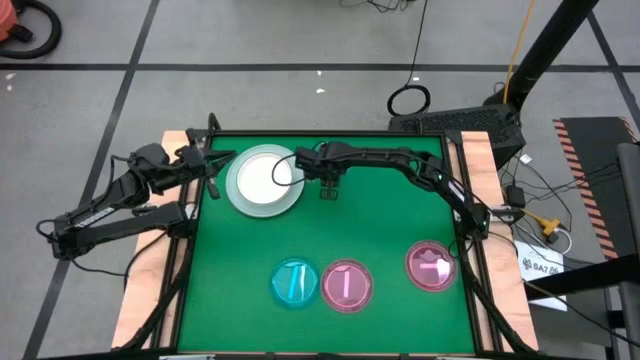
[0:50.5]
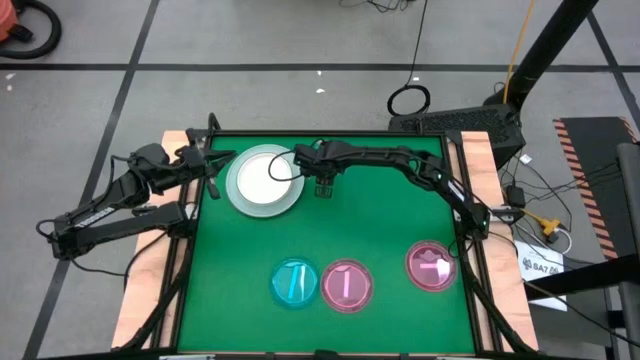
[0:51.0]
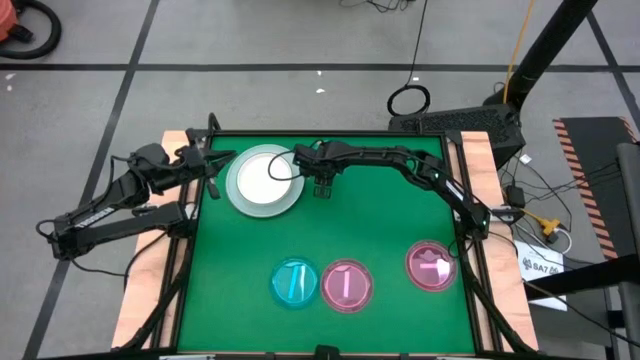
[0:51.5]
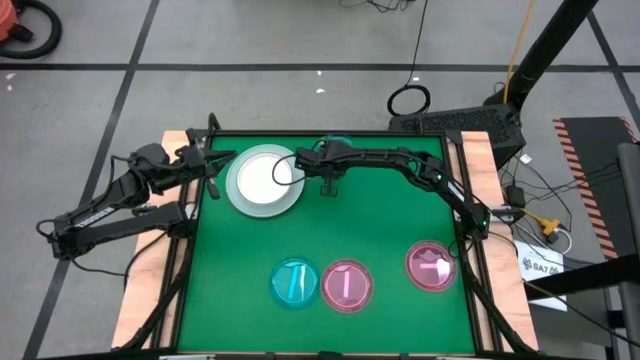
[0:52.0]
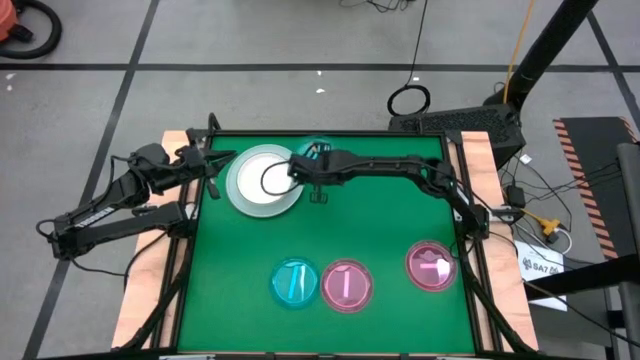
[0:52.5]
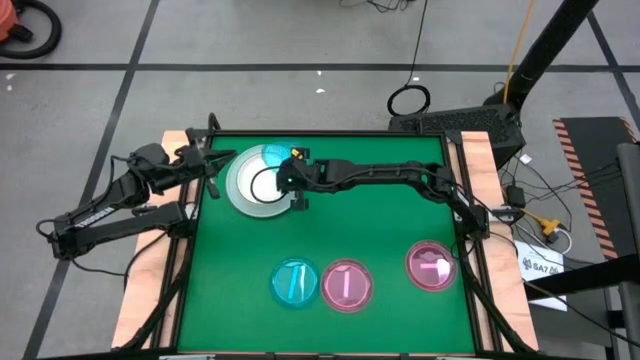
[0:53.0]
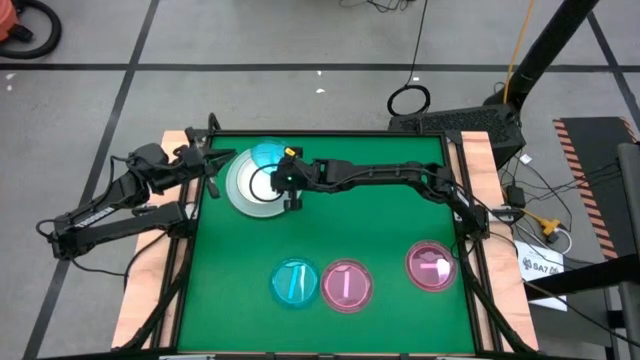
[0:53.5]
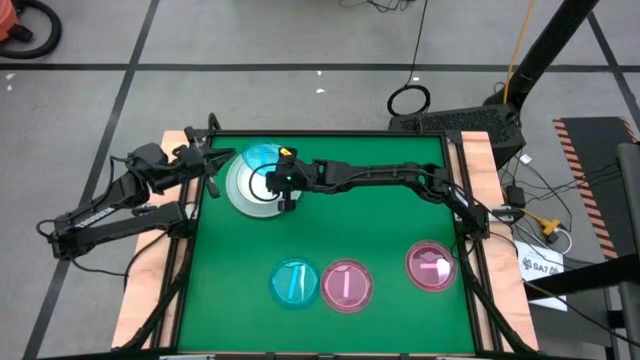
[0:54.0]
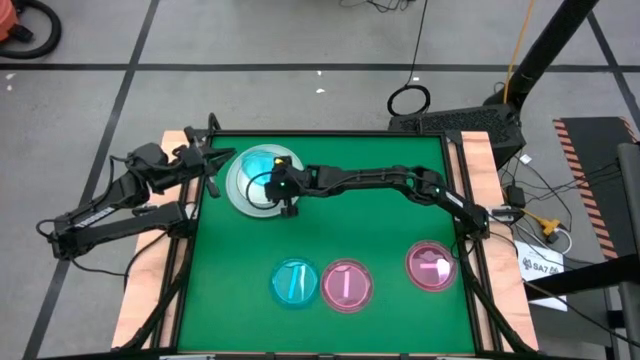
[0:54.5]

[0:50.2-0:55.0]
Task: Stack plastic plates
Stack the top blue plate on top of the white plate

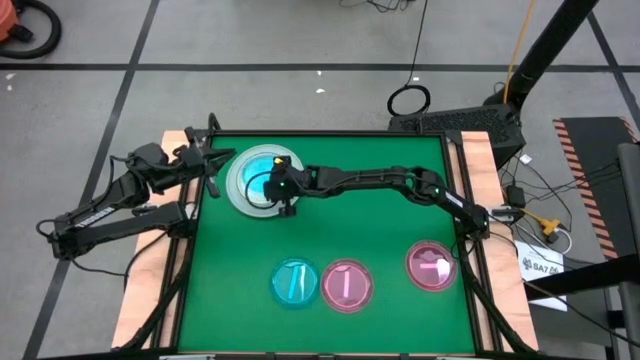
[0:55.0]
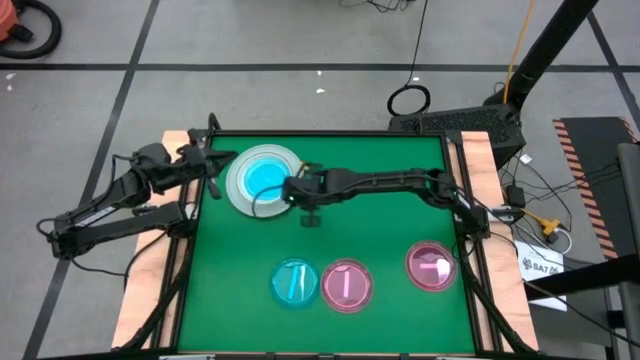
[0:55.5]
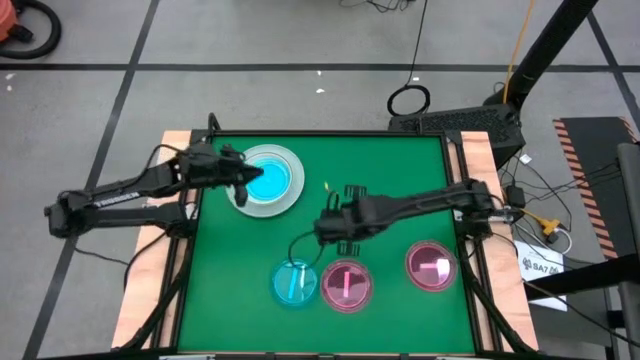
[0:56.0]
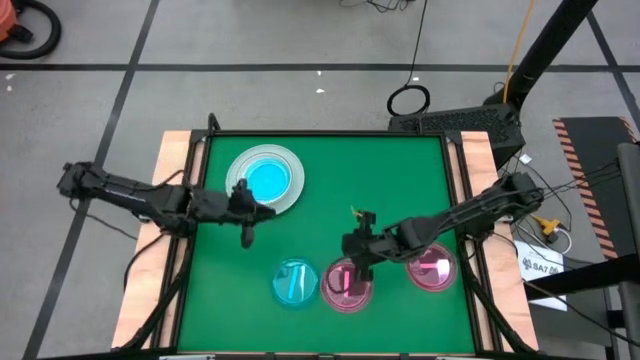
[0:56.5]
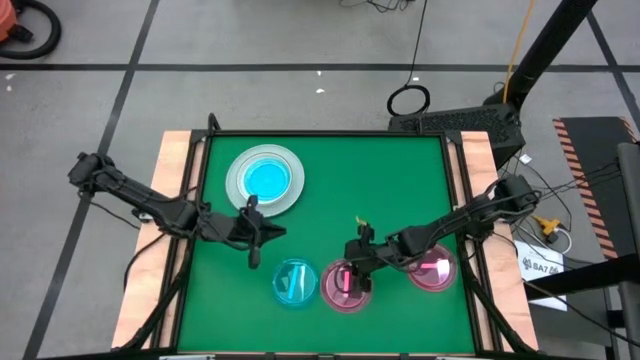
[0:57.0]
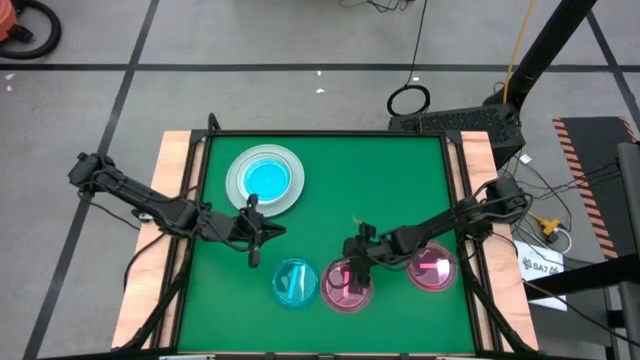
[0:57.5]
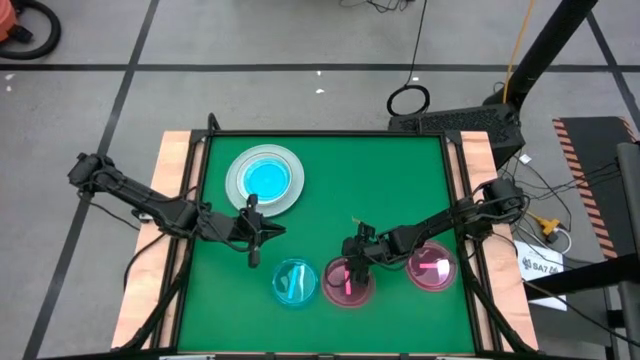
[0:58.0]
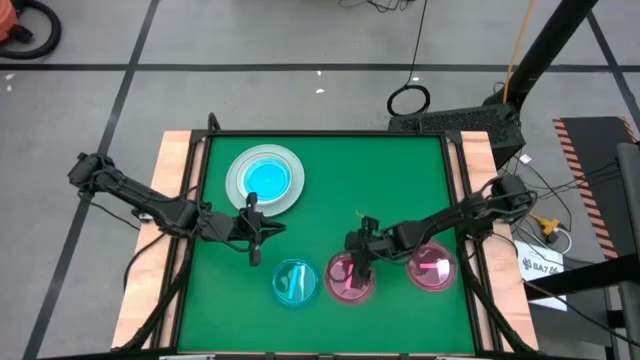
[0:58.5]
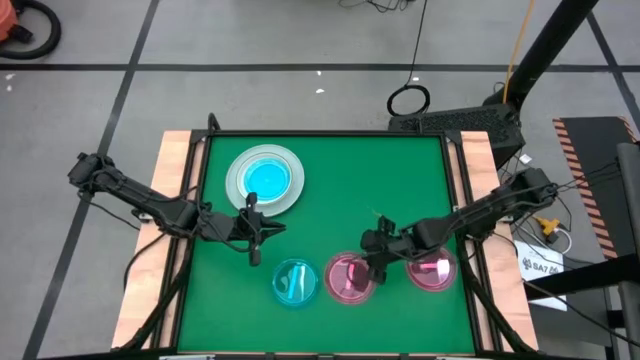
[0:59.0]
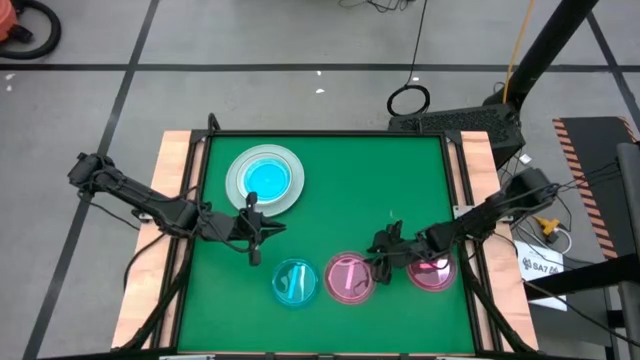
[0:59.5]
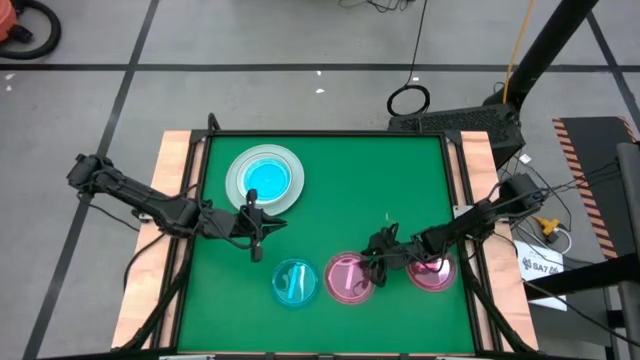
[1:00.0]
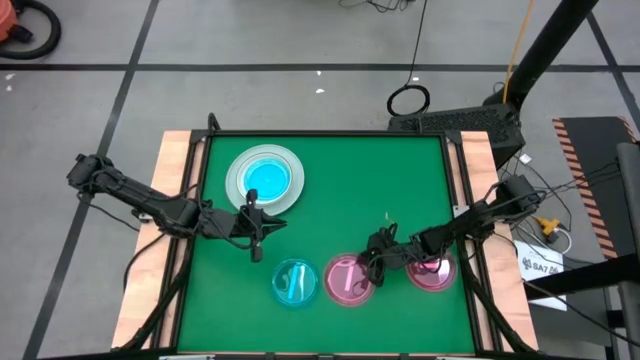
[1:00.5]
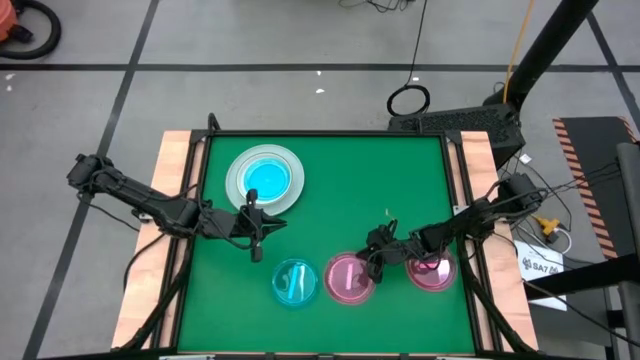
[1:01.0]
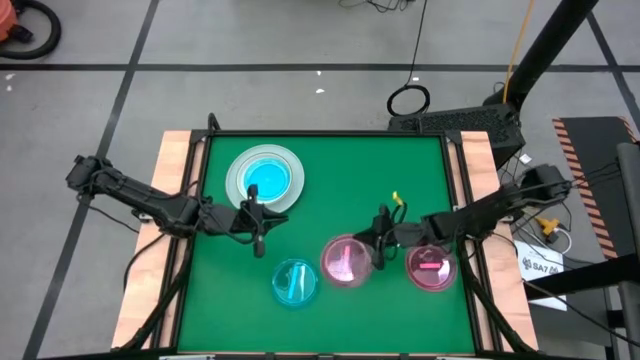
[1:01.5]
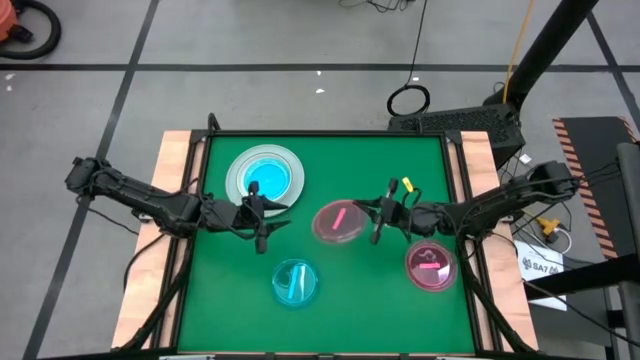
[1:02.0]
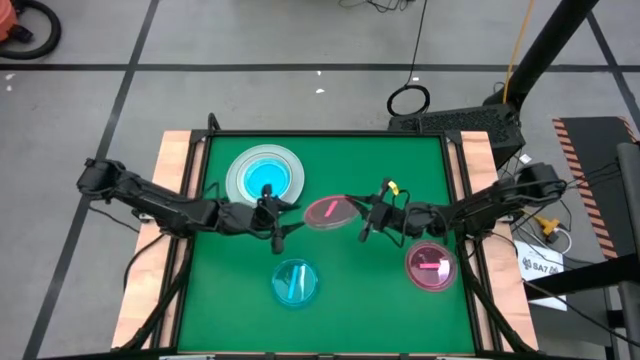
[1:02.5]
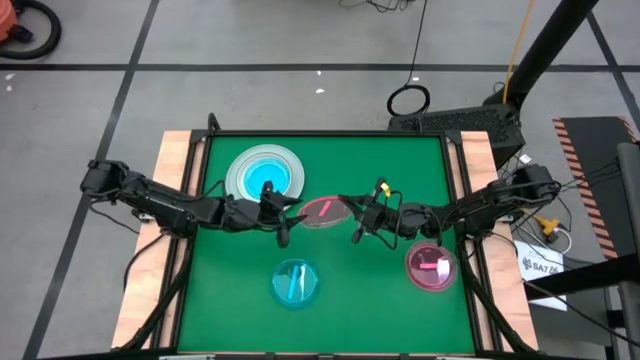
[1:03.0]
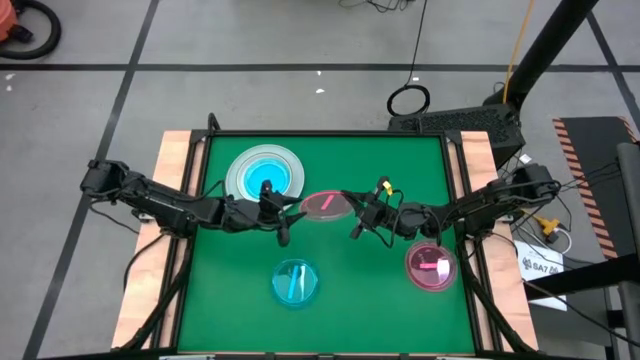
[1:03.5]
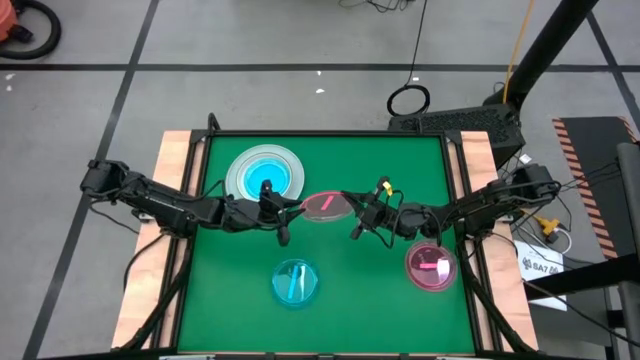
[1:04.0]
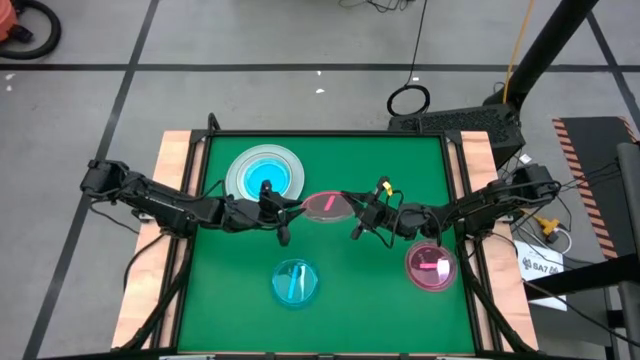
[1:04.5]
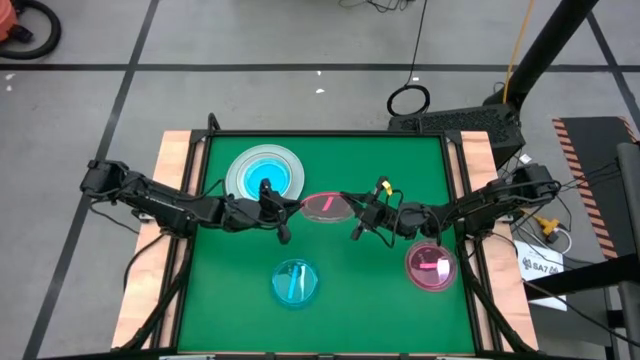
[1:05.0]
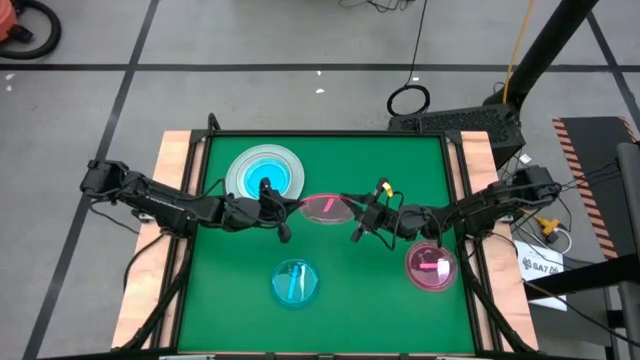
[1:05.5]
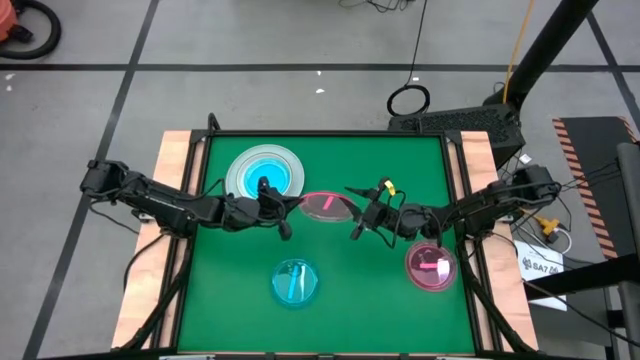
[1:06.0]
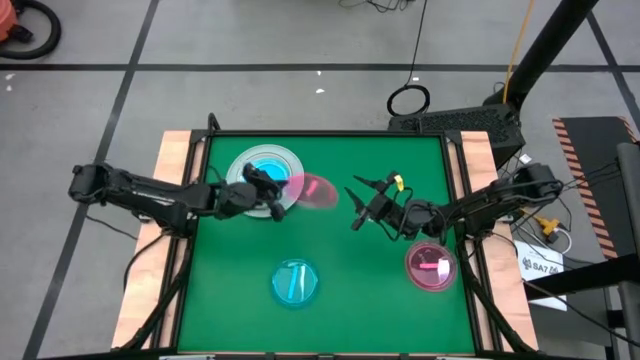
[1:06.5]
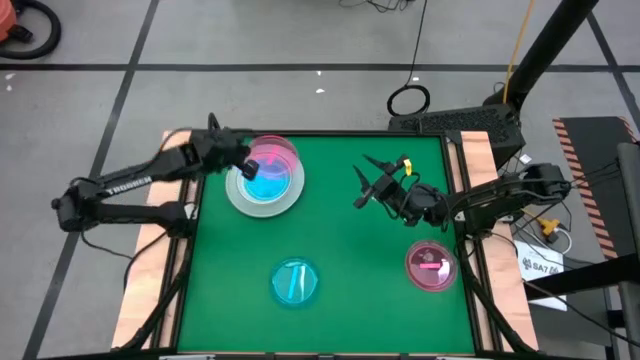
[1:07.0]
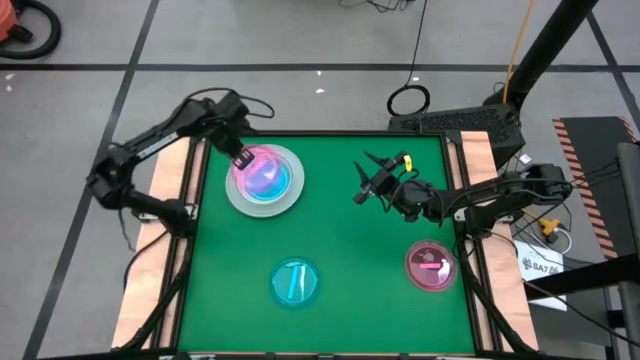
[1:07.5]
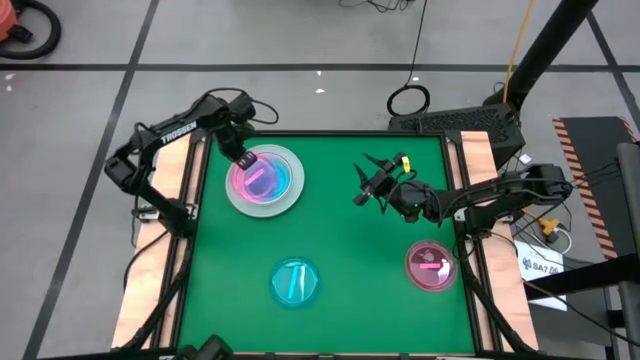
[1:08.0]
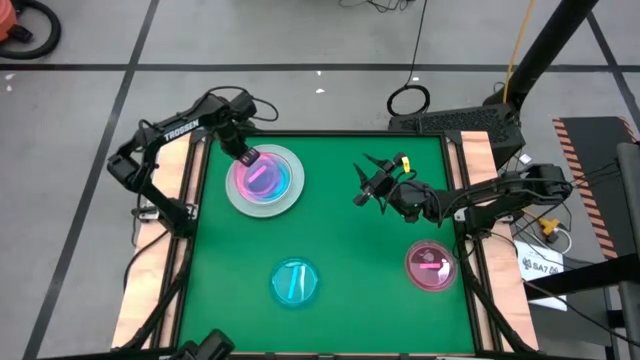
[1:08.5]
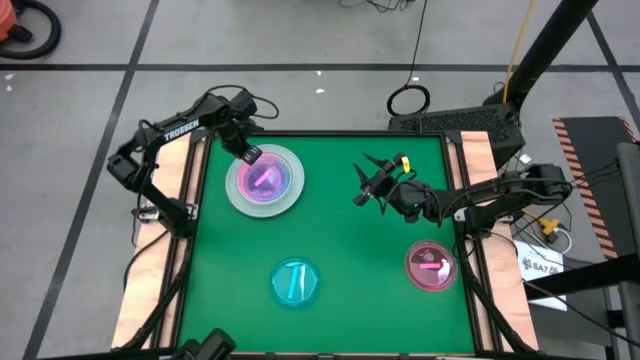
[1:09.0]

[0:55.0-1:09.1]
Stack the left pink plate on top of the blue plate

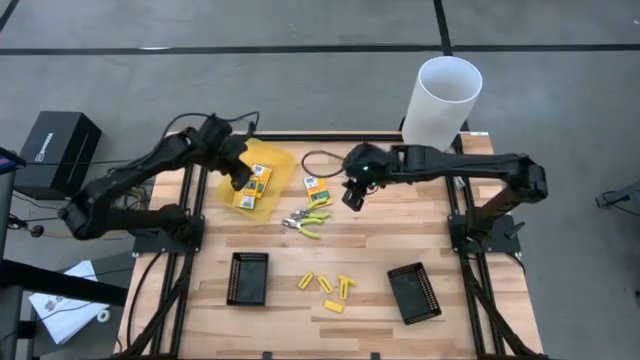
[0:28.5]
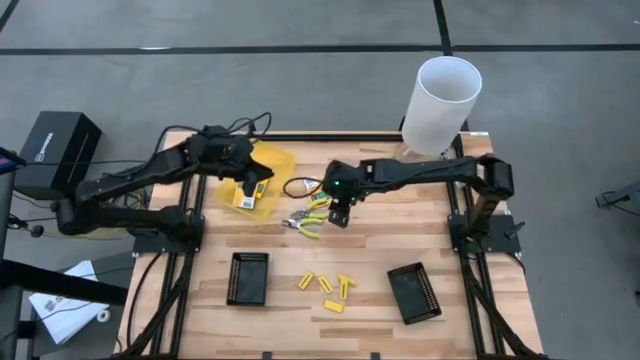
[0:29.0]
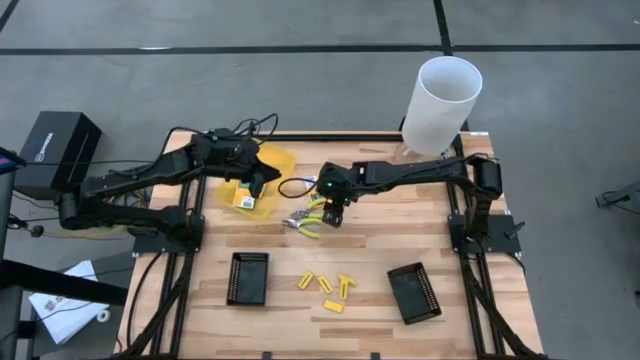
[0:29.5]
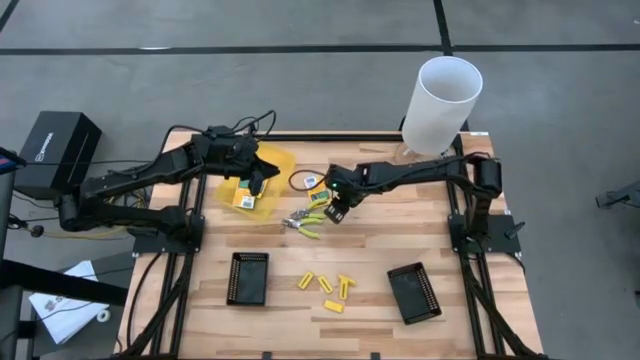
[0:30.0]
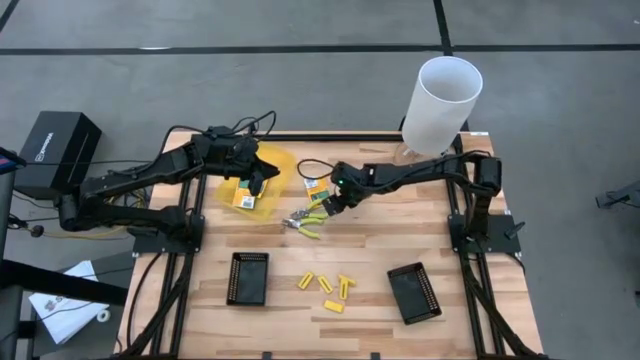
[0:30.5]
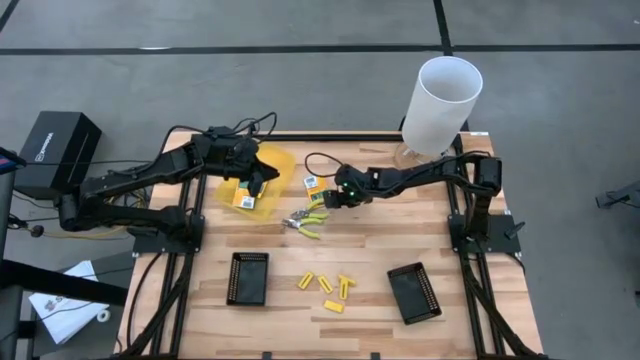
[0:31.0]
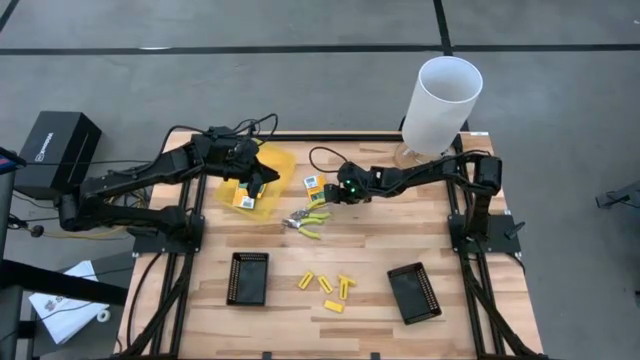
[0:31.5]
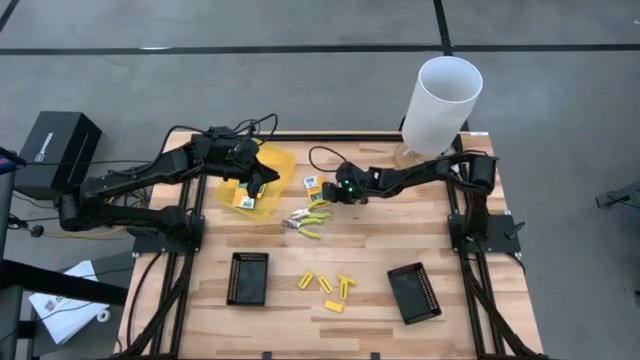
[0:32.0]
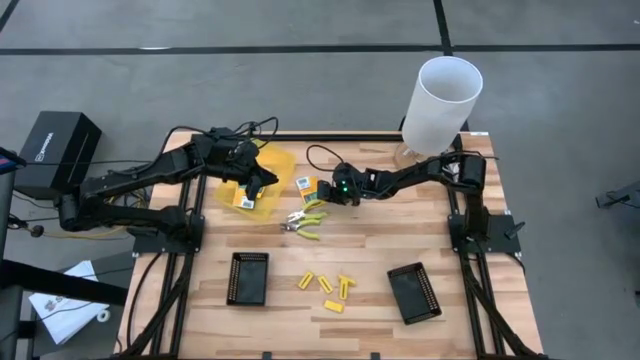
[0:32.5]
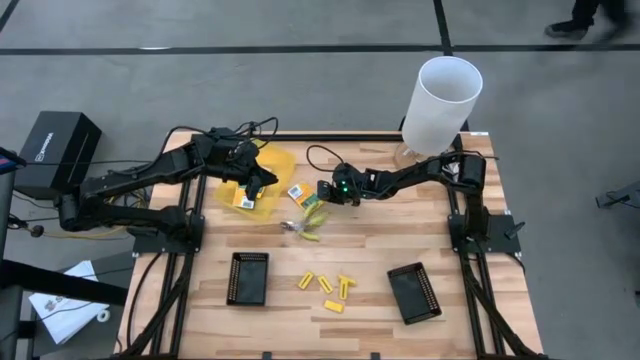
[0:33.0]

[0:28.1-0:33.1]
Task: Pick & Place School Supplies
Put the yellow crayon box into the yellow bin
